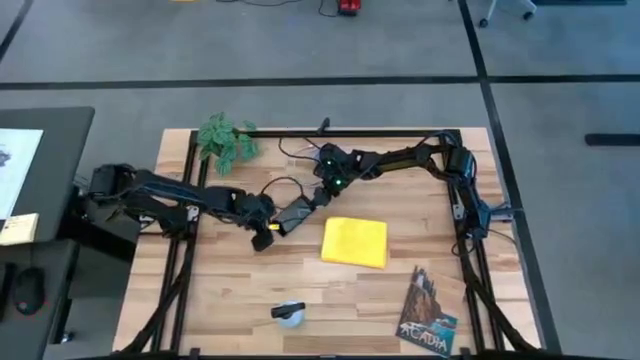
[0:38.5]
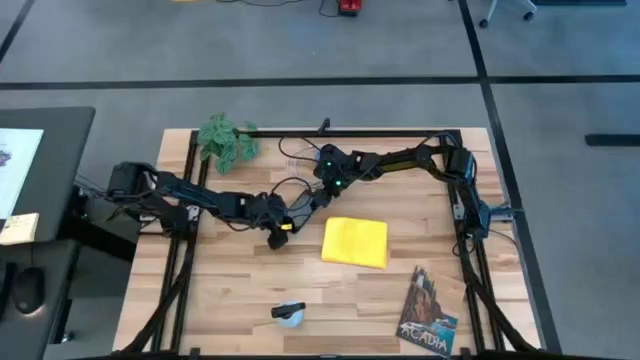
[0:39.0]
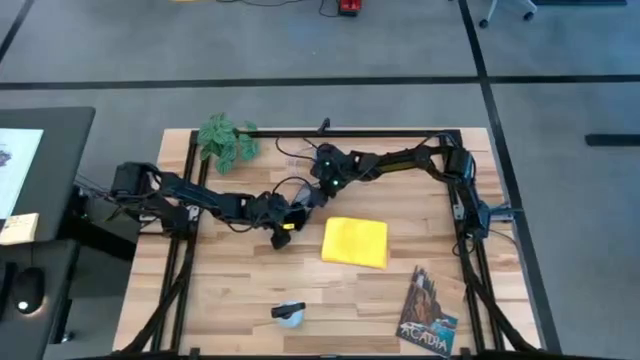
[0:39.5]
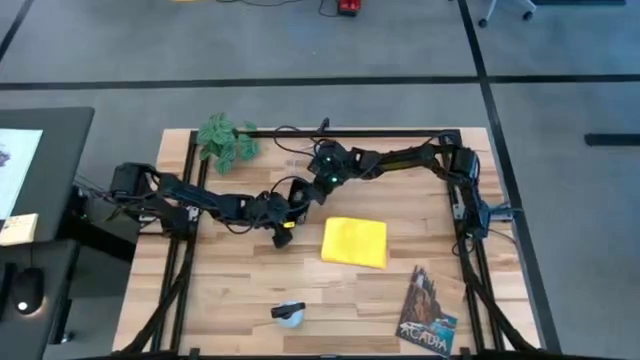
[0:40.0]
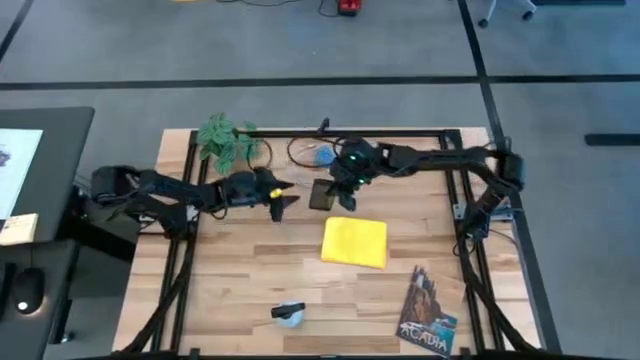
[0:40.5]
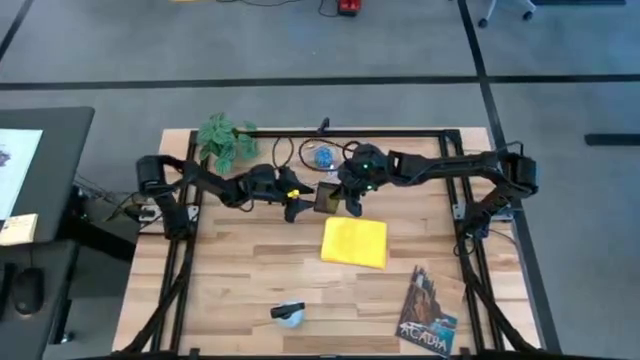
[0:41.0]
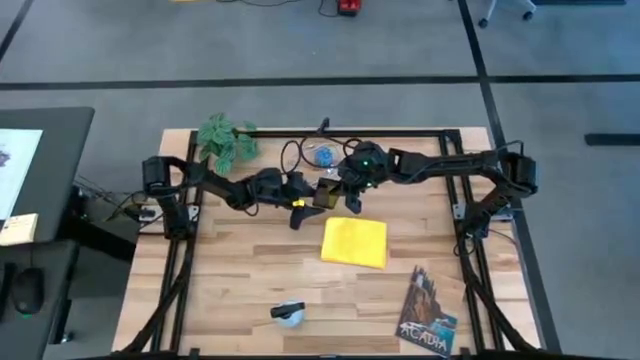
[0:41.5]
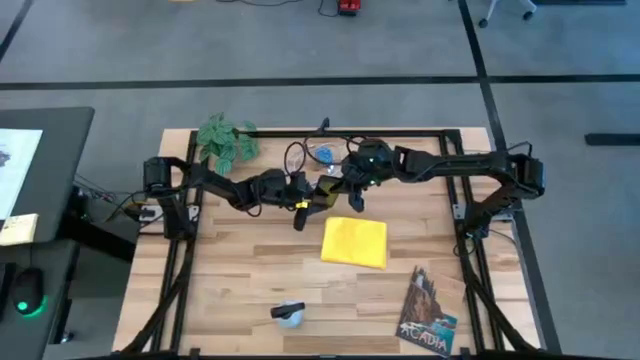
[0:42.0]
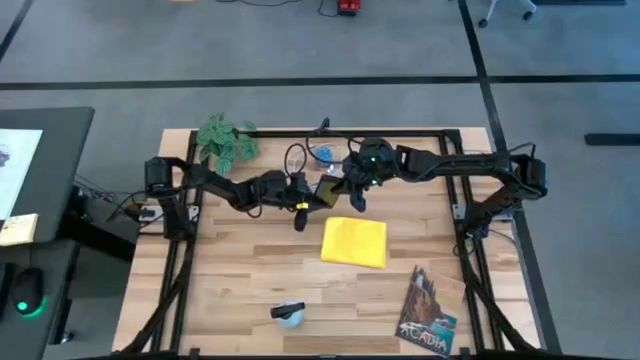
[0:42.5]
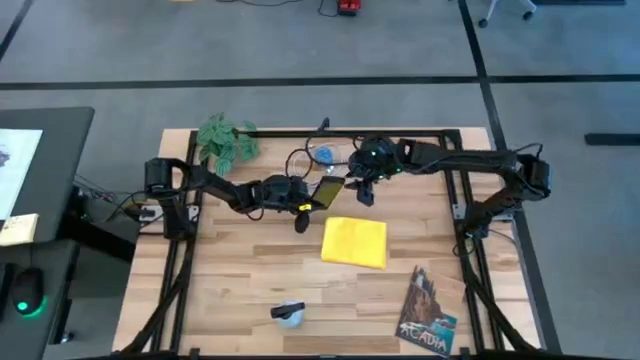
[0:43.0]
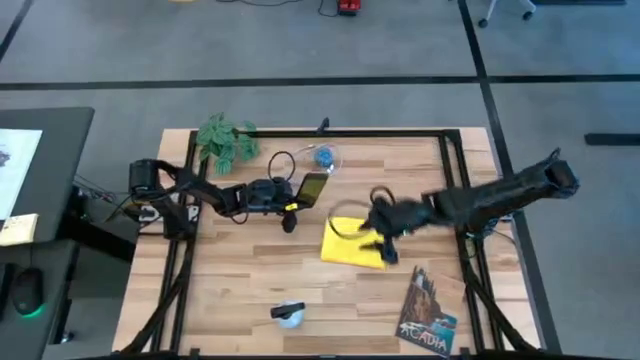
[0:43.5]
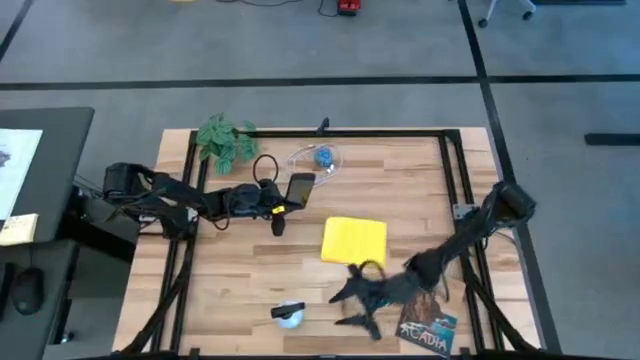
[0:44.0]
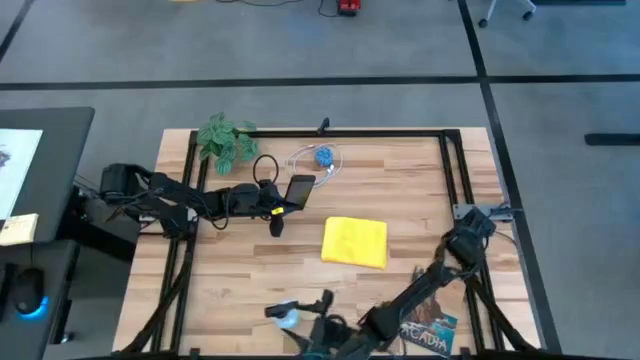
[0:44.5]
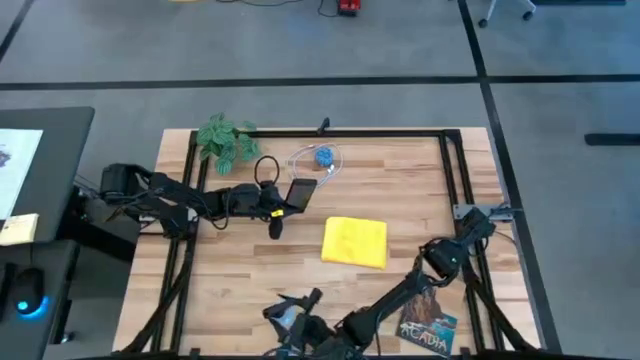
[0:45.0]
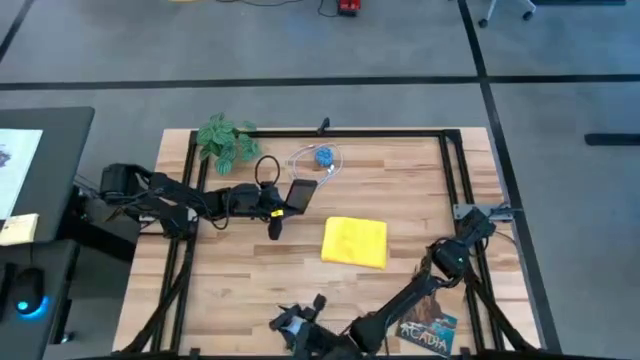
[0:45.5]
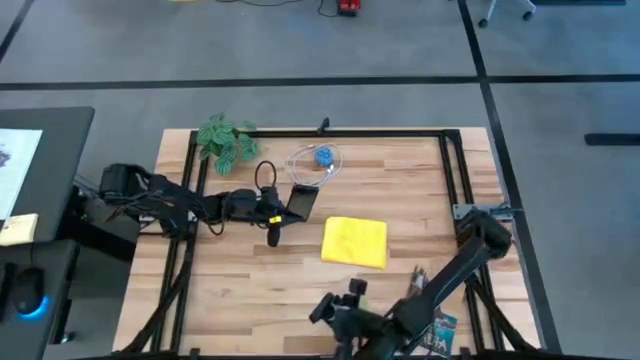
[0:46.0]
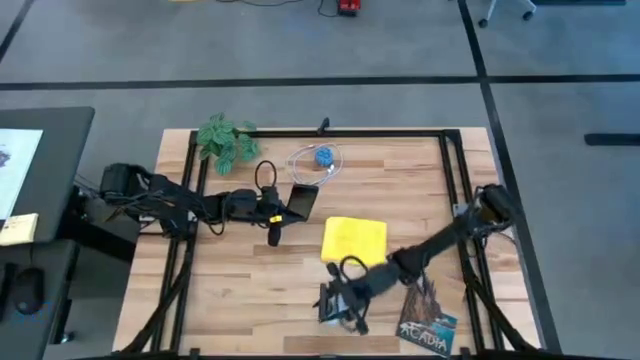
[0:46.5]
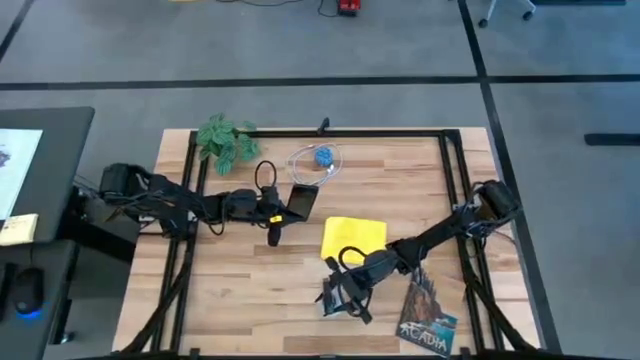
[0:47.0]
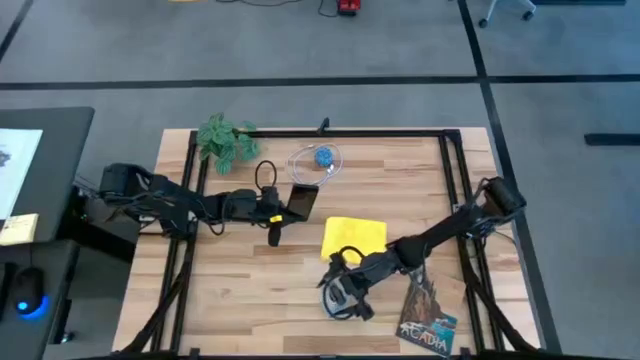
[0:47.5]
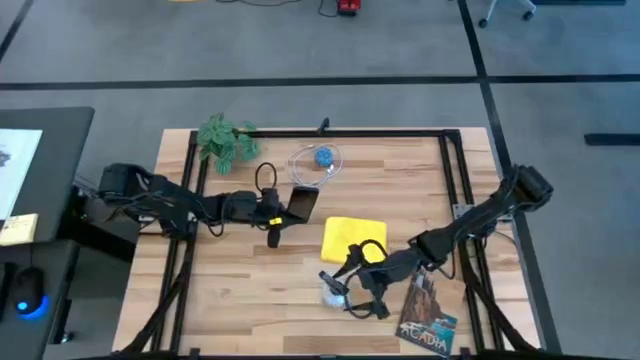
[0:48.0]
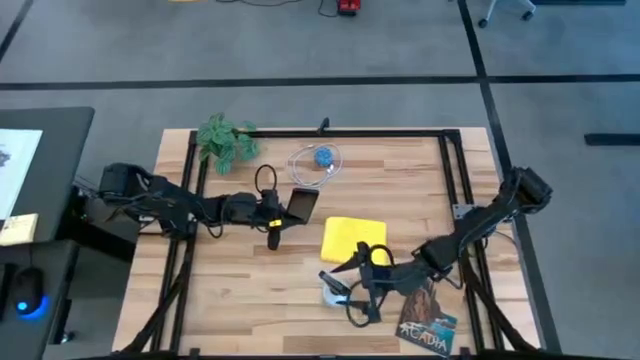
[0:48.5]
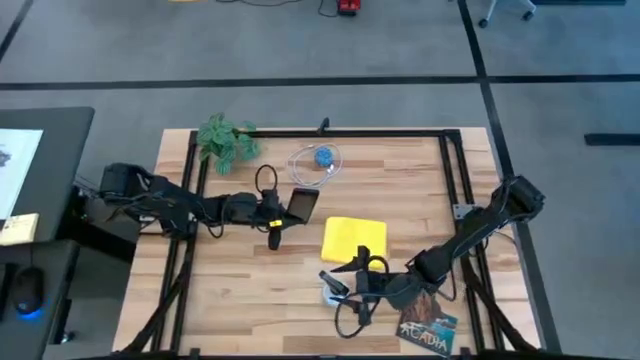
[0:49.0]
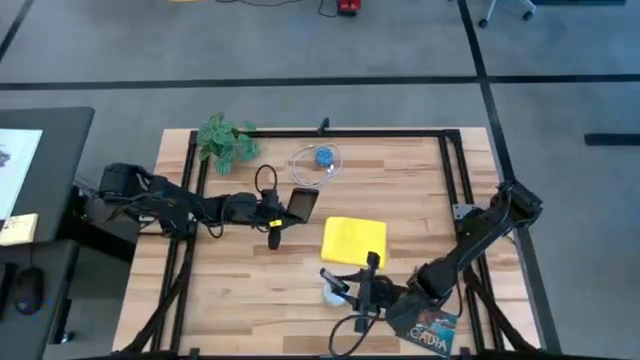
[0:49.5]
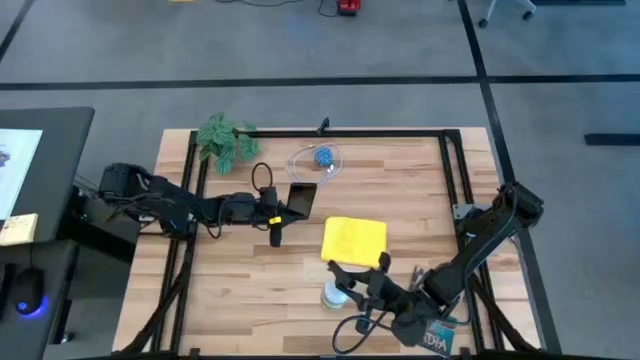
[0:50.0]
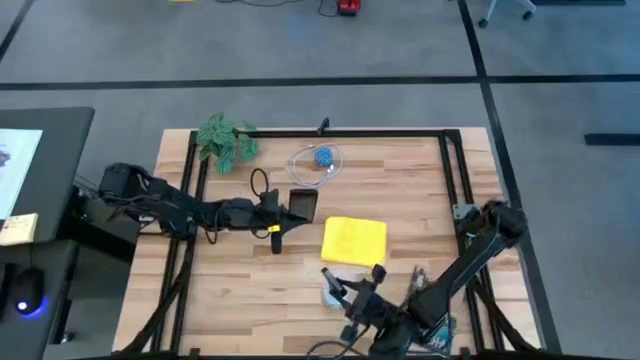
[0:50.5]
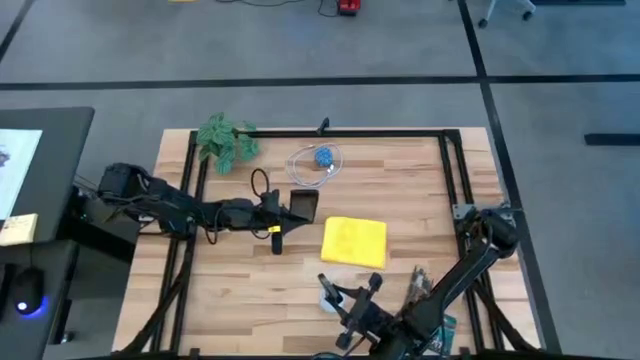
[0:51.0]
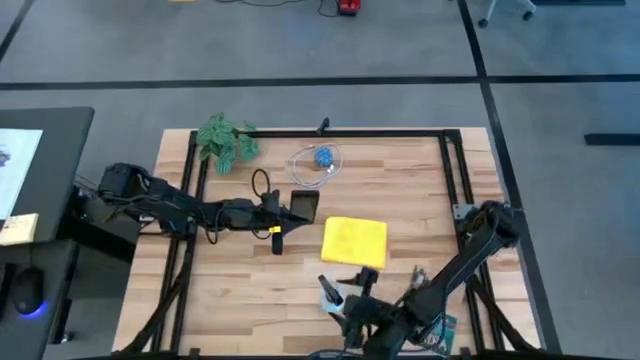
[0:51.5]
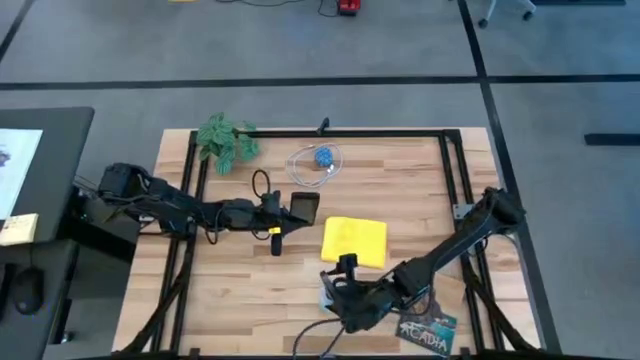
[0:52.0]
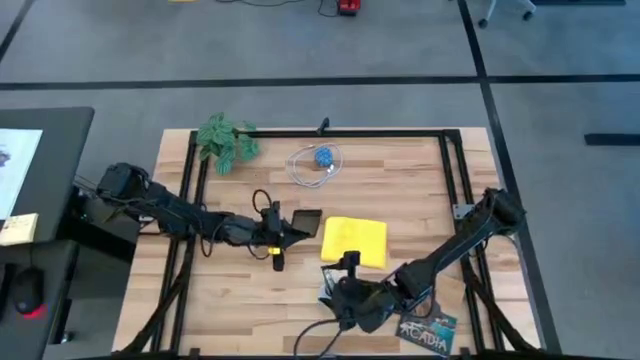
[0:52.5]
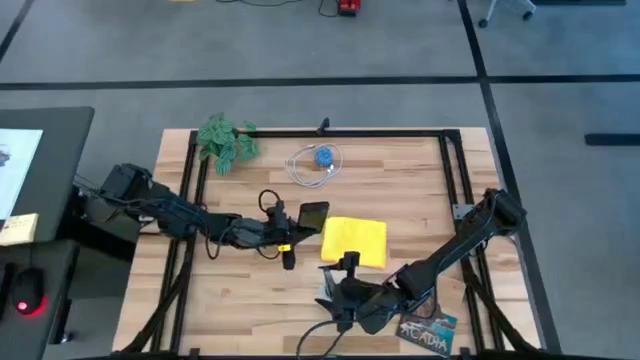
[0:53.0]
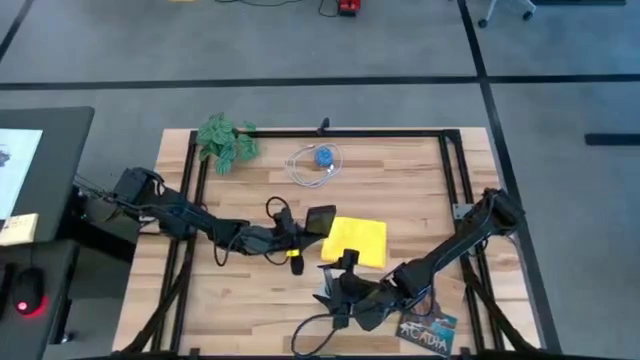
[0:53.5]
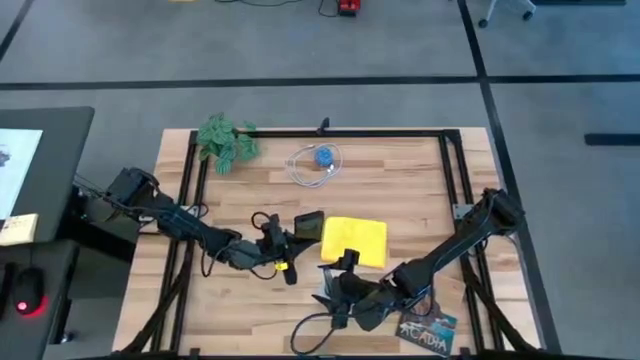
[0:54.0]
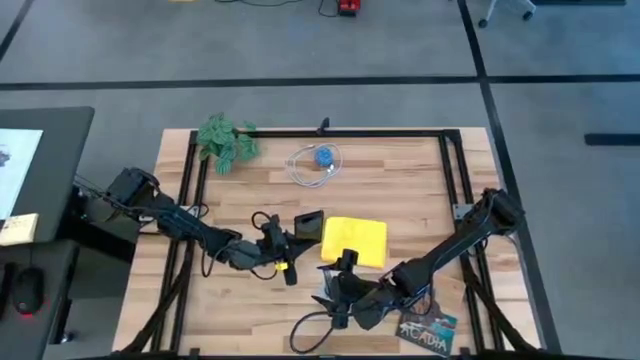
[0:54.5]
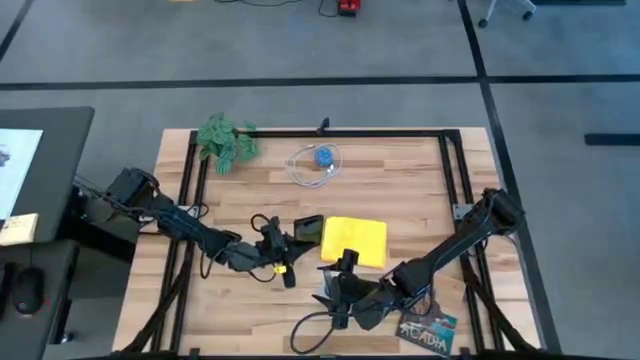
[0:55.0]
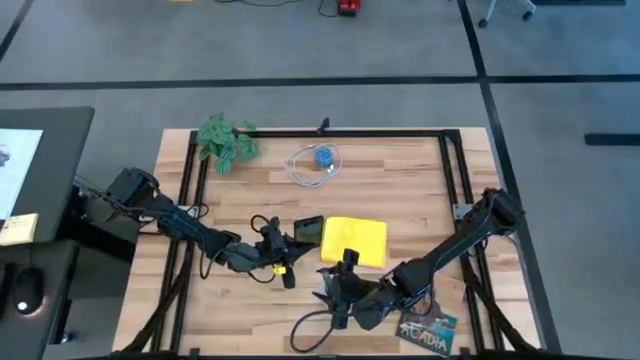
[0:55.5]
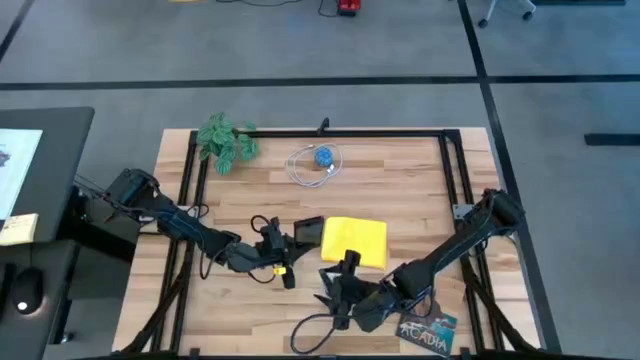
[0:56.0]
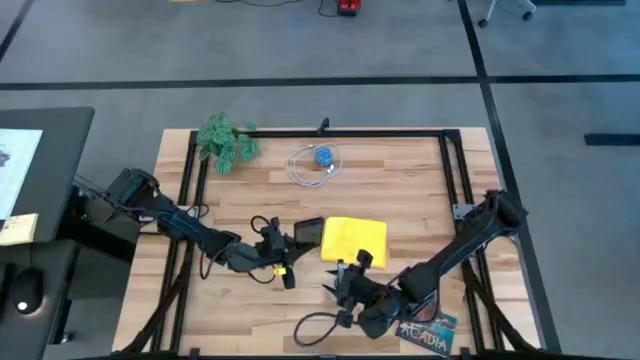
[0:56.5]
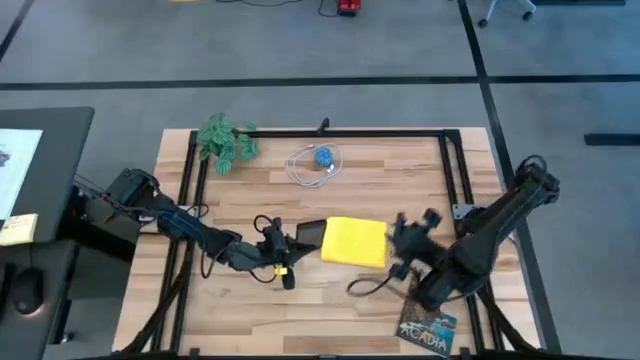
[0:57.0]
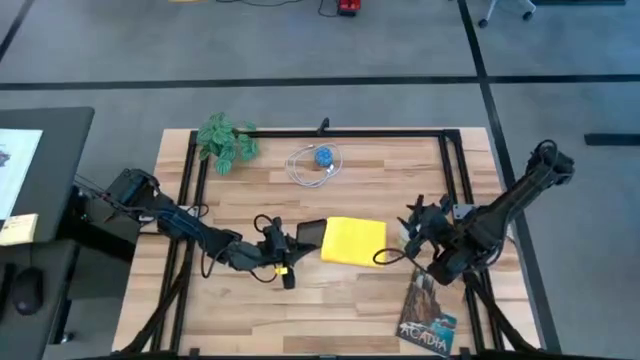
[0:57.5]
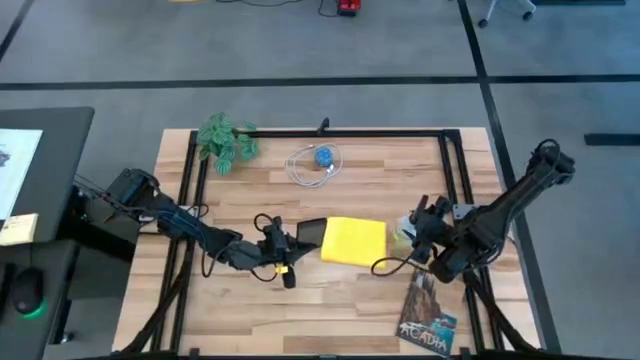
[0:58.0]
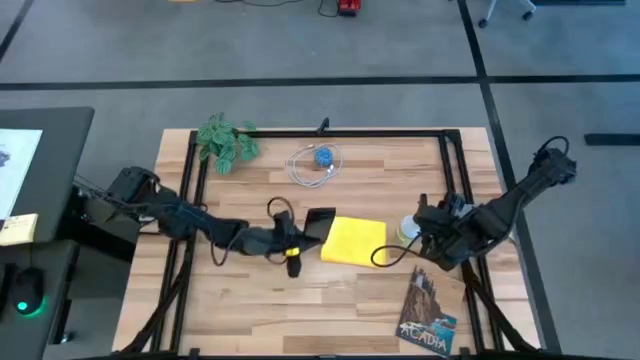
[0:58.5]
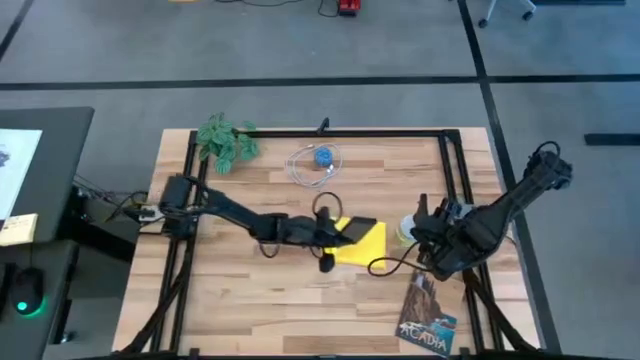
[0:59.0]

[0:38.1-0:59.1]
Task: Apply microfiber cloth
Spray the front of the cellphone using the cleaning bottle
